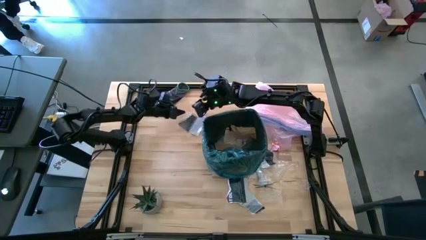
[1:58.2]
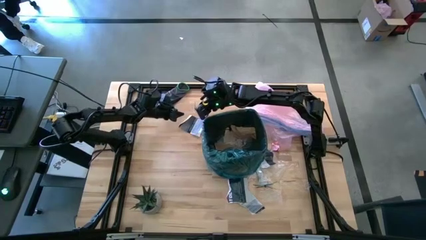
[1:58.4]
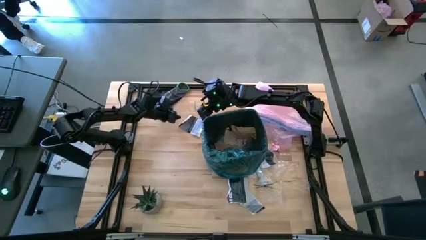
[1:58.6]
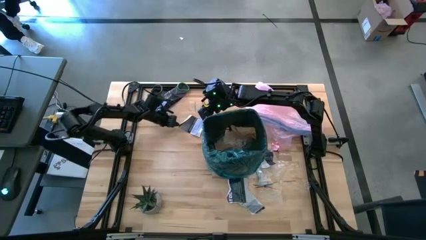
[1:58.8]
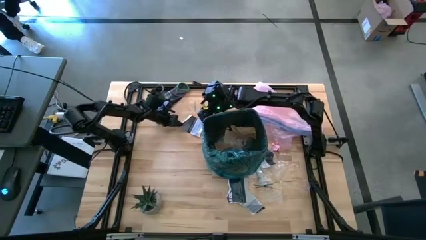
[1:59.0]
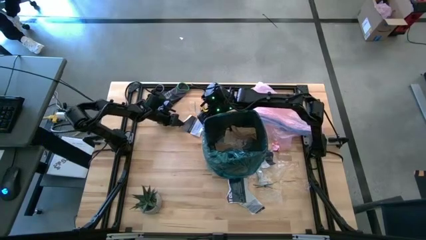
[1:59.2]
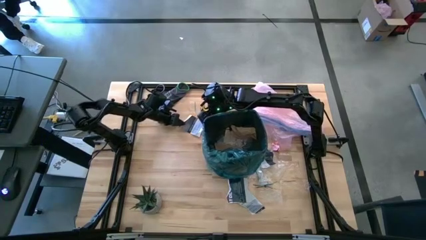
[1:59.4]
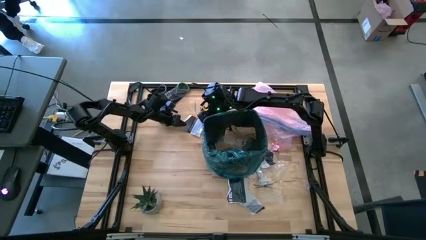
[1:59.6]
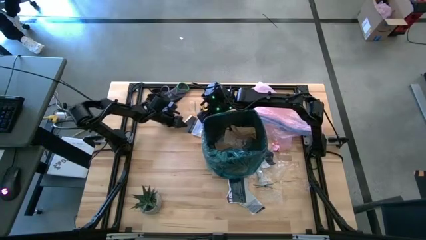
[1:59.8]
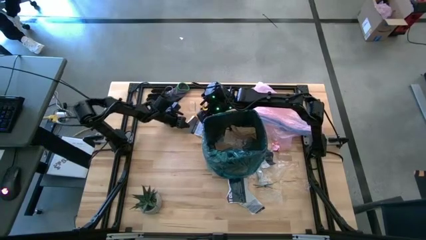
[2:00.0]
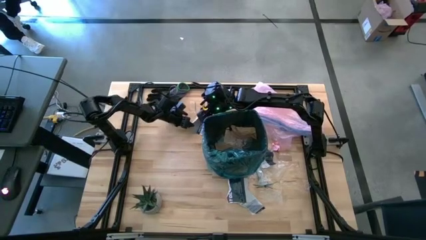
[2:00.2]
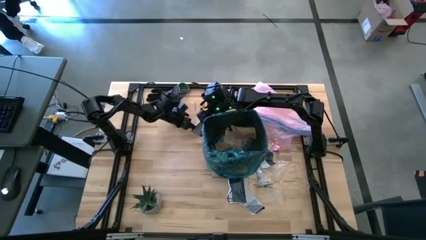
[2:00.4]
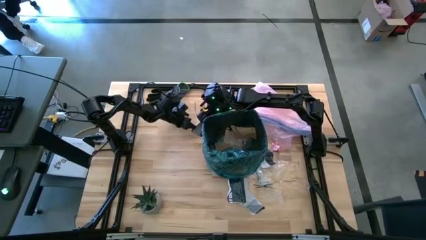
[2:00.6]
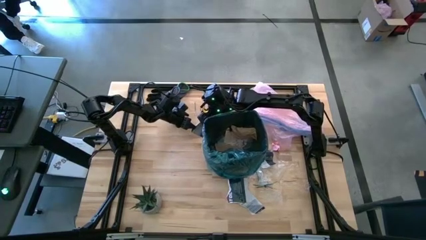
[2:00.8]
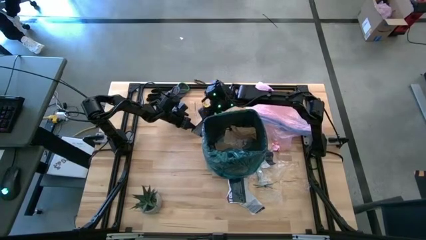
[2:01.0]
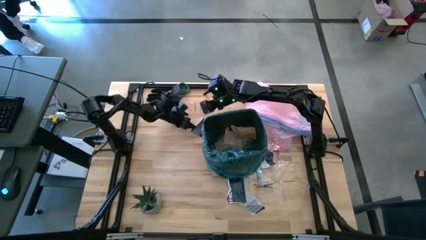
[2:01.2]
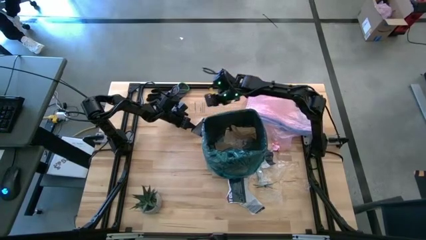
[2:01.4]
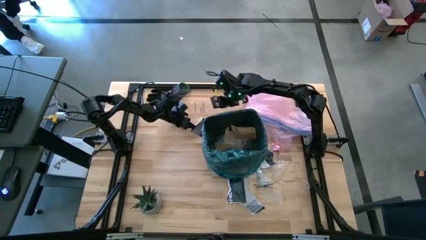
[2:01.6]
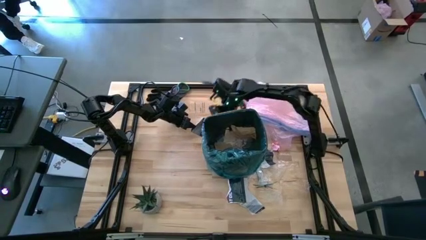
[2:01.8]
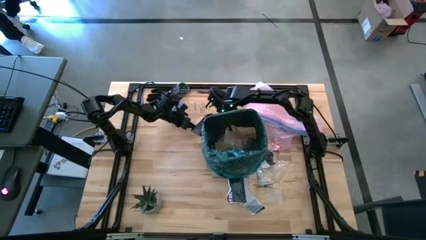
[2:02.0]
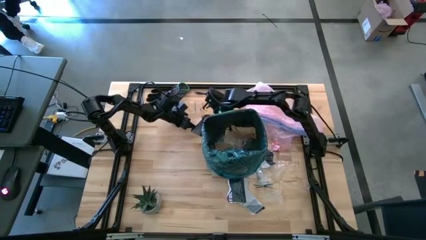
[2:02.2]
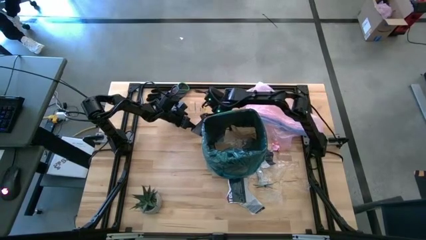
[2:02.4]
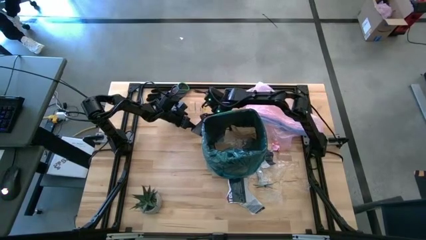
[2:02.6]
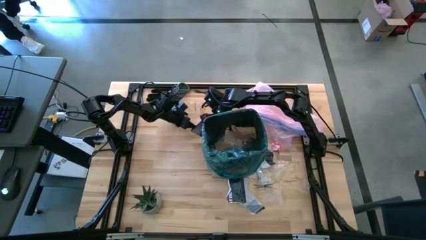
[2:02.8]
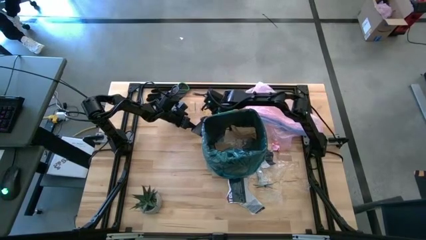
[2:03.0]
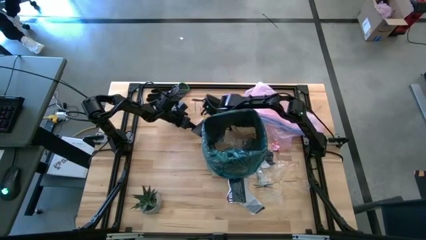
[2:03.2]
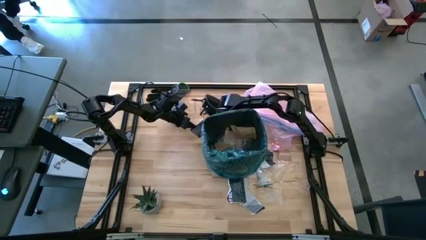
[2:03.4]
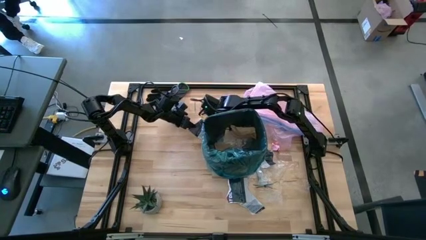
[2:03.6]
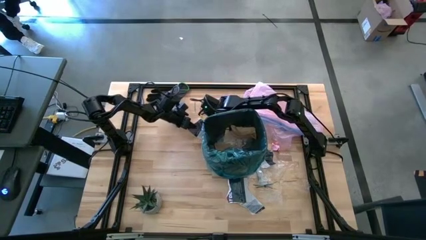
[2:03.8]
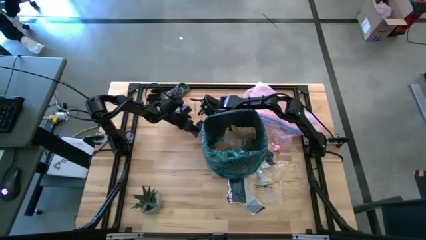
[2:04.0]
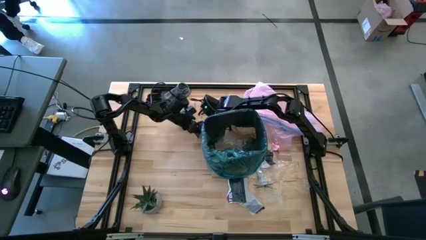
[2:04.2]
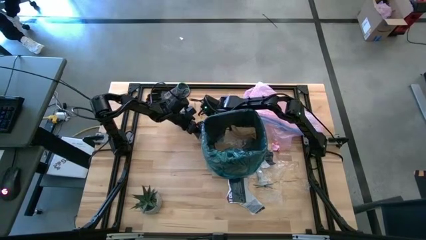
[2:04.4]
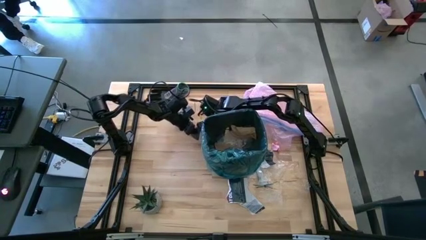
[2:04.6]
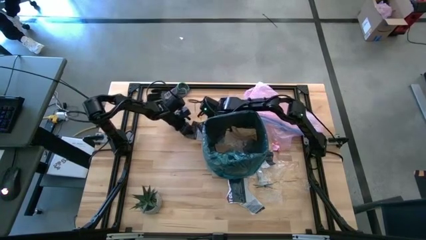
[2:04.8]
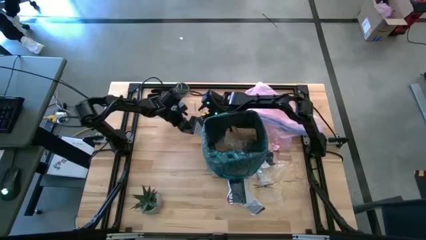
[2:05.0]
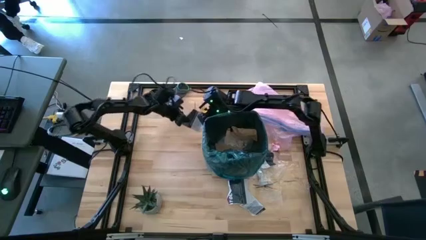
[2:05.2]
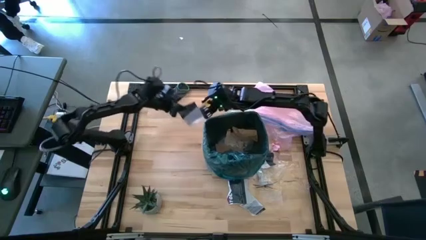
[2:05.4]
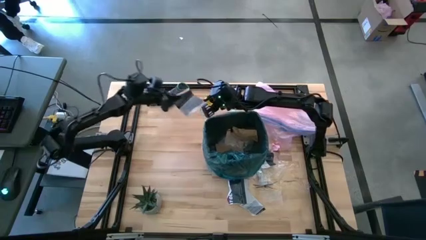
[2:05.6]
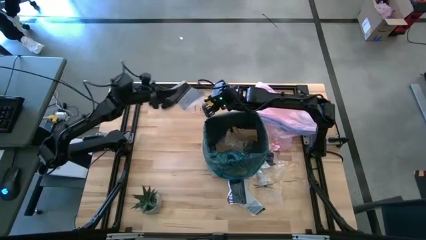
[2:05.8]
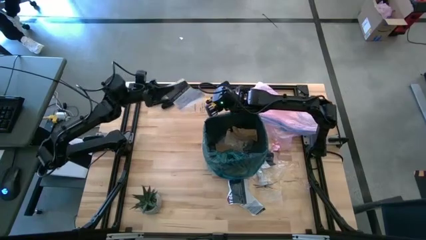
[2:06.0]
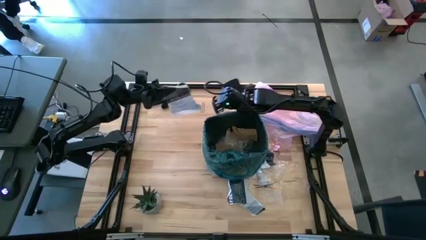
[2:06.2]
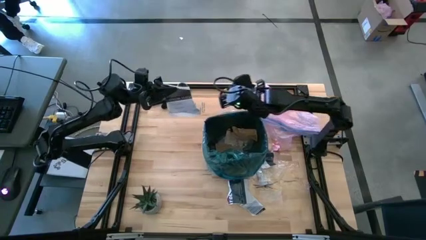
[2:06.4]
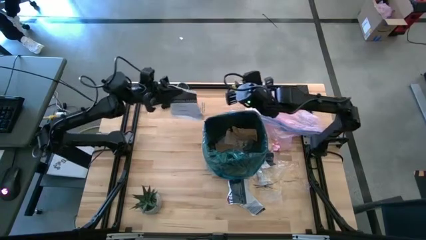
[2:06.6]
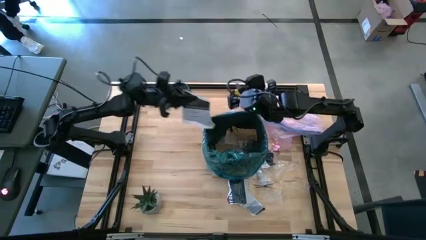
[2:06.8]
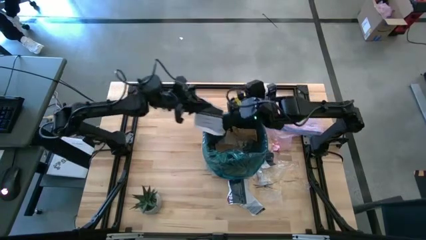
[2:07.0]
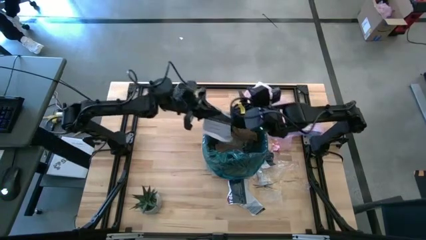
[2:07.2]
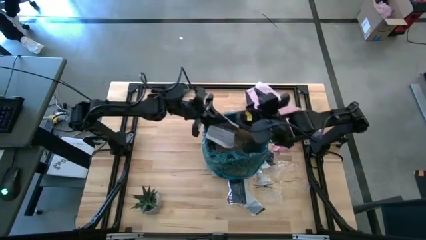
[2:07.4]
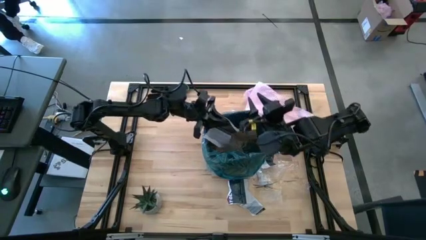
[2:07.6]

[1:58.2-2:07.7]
Task: place trash/remove bag and relplace
Put the printed paper into the trash bin

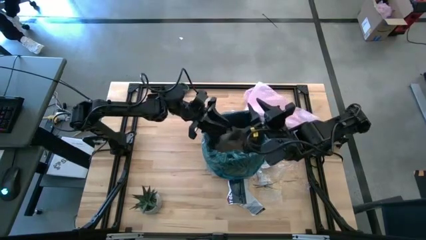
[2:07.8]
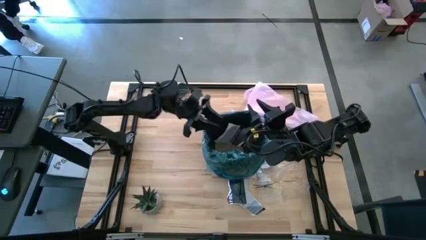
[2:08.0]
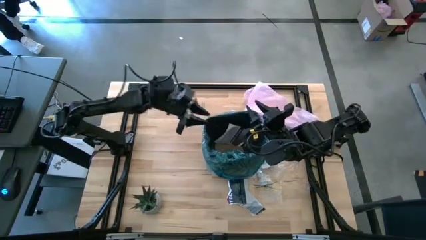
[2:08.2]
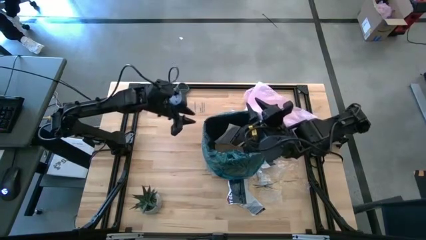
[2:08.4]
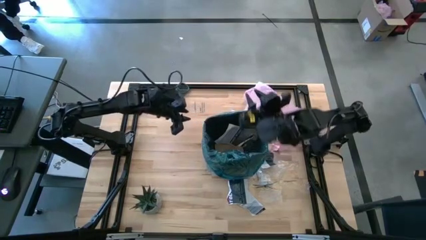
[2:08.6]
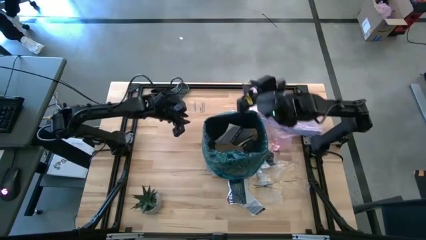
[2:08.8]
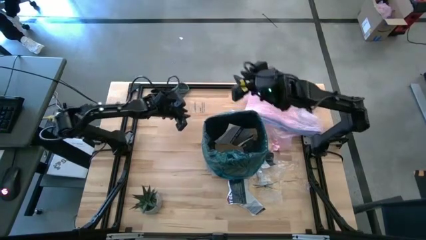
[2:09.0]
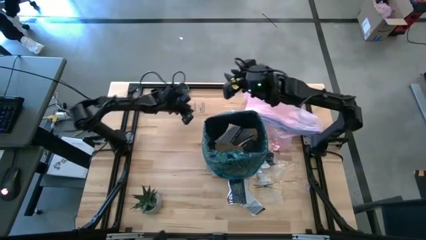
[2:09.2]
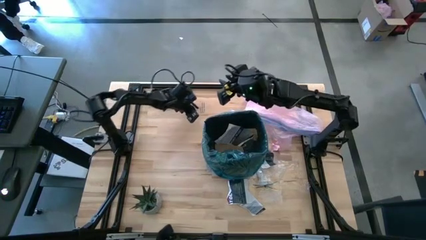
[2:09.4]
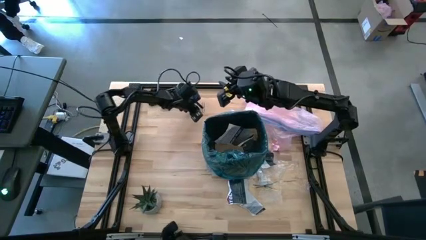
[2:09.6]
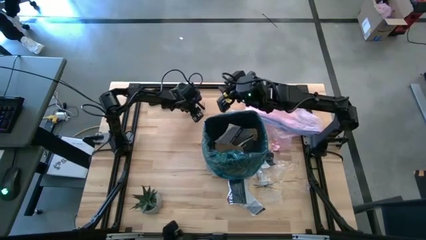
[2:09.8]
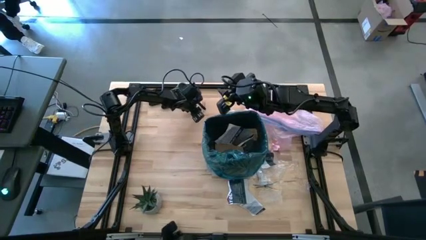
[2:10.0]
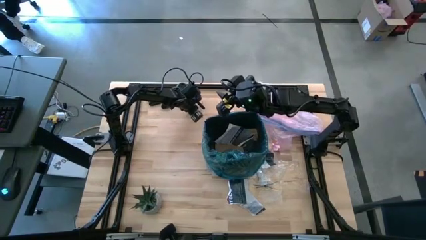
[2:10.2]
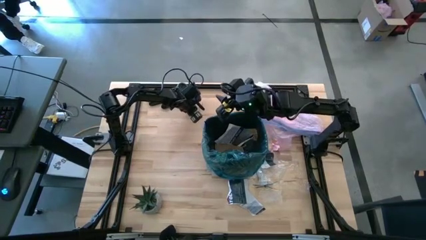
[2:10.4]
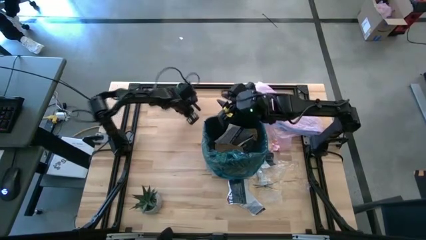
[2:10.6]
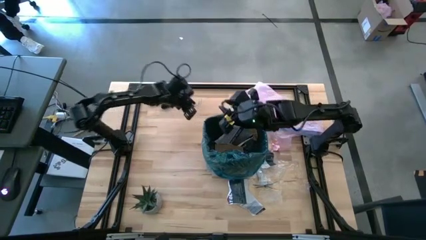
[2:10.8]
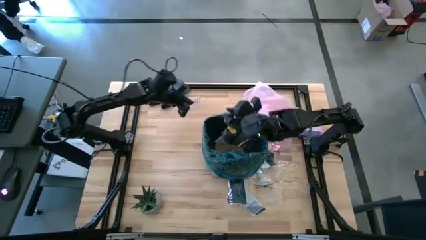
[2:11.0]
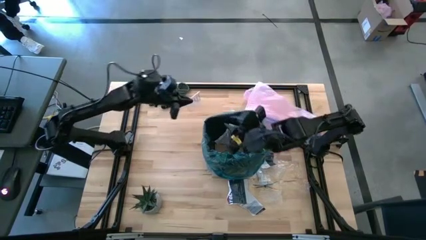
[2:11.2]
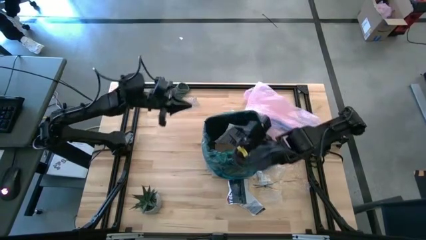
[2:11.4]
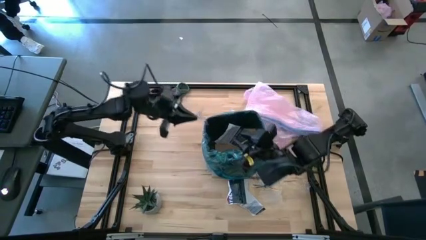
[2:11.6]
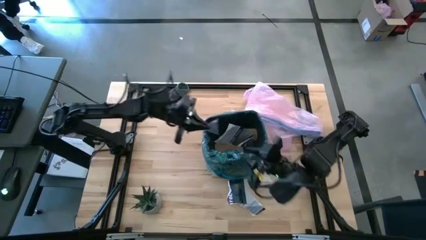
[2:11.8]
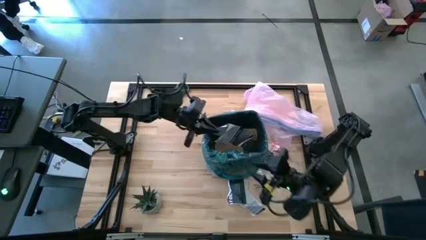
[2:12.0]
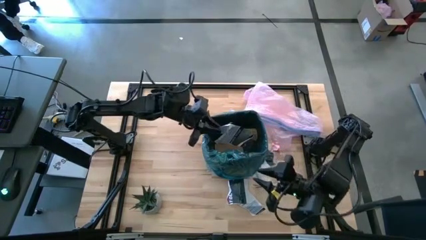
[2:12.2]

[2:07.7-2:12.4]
Put the printed plastic into the trash bin

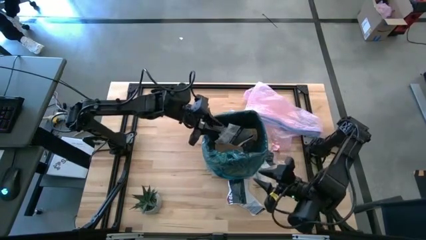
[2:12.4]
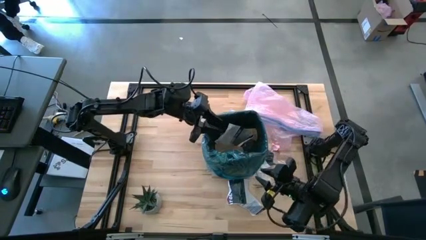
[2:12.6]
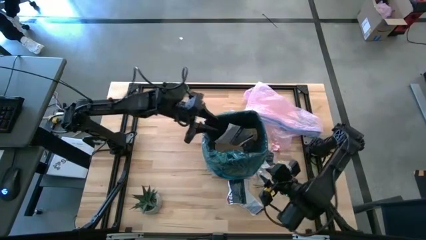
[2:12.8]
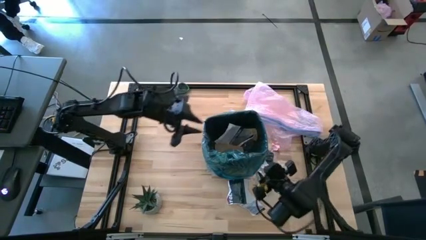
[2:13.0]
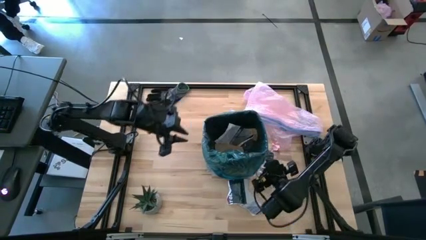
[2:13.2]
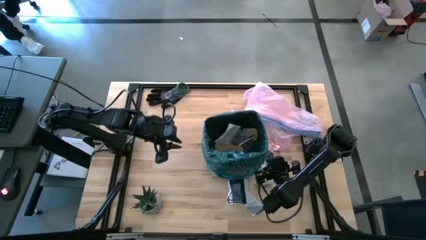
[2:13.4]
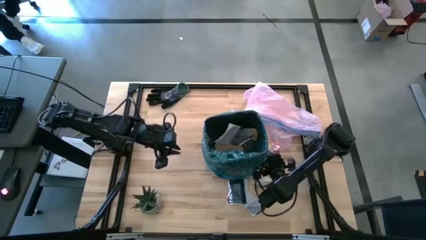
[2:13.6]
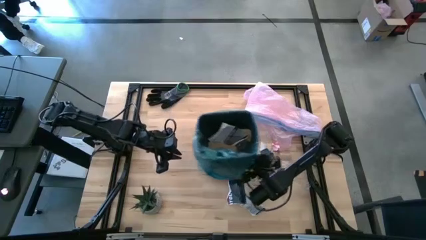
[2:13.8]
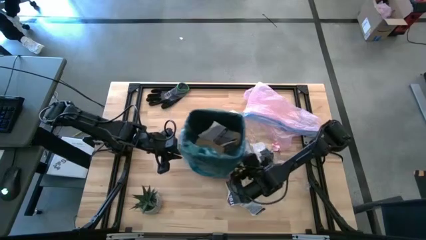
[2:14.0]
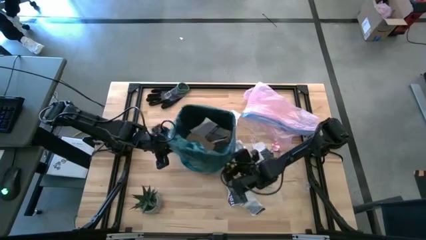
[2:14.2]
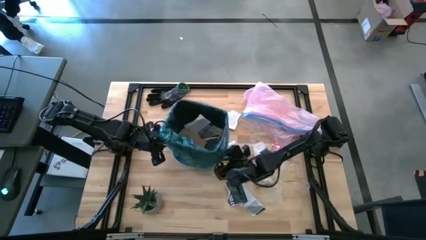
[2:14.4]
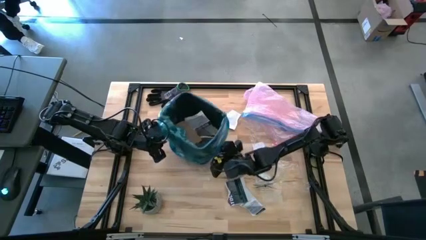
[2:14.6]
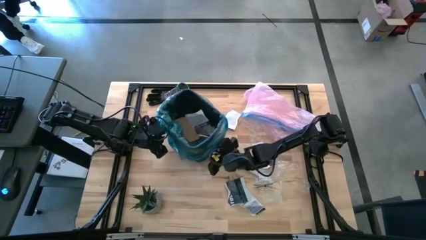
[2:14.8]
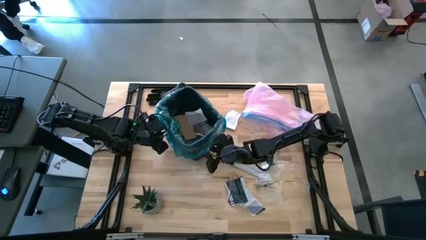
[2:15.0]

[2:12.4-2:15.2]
Adjust the trash bin
